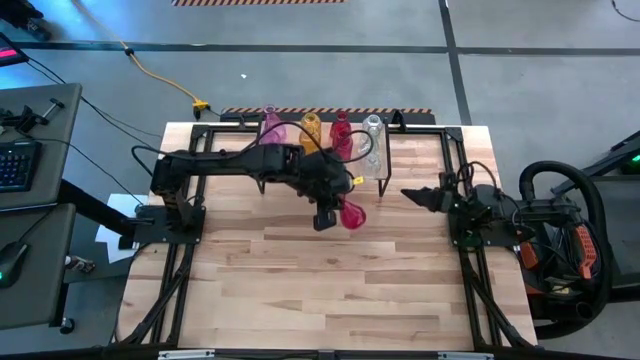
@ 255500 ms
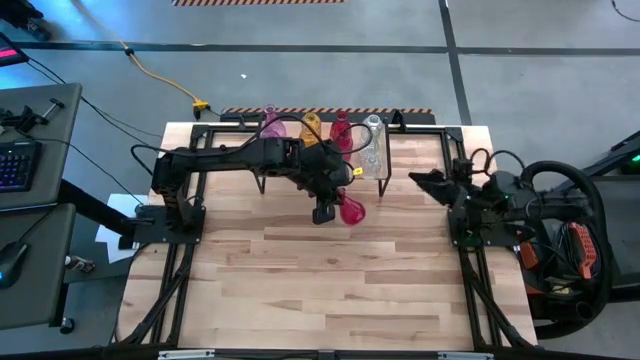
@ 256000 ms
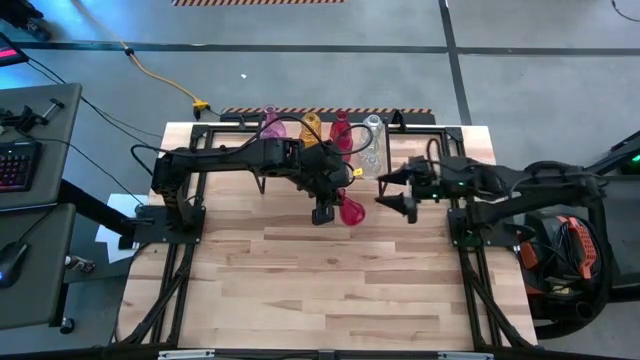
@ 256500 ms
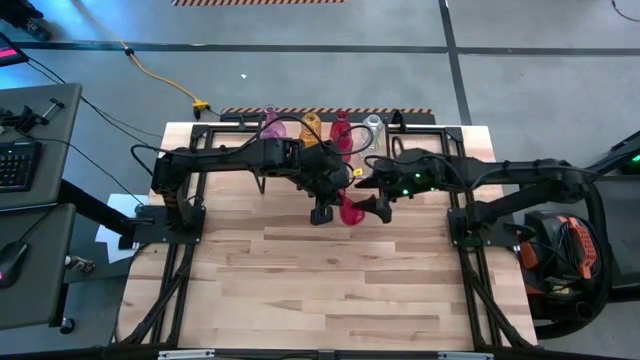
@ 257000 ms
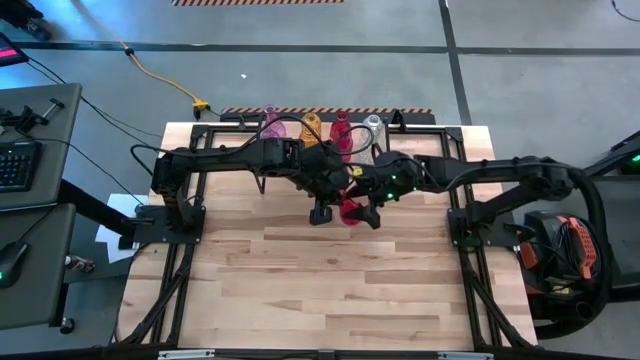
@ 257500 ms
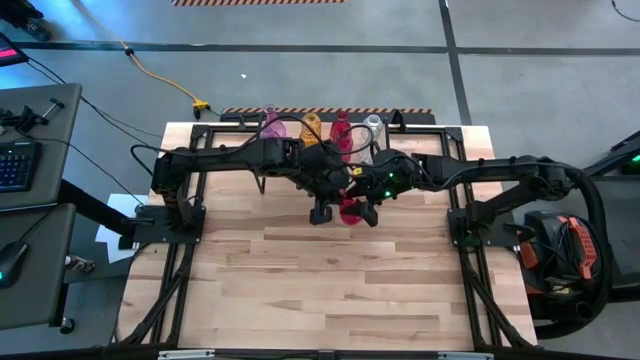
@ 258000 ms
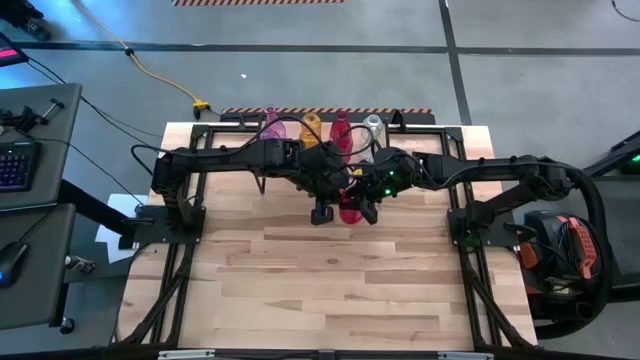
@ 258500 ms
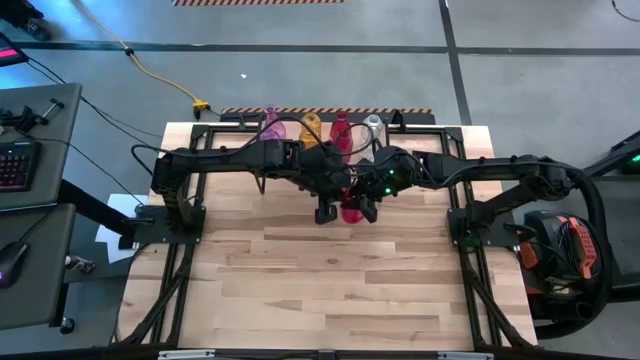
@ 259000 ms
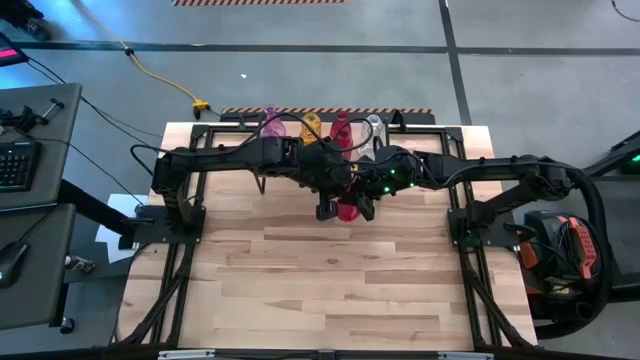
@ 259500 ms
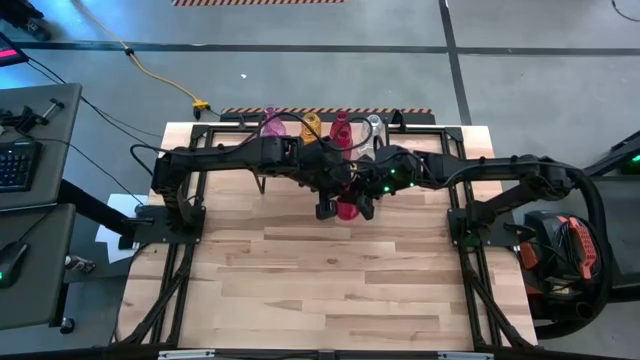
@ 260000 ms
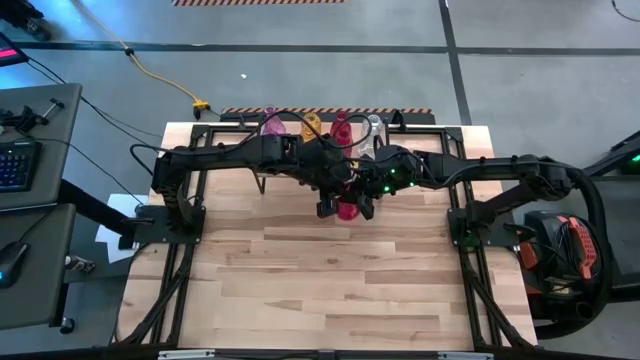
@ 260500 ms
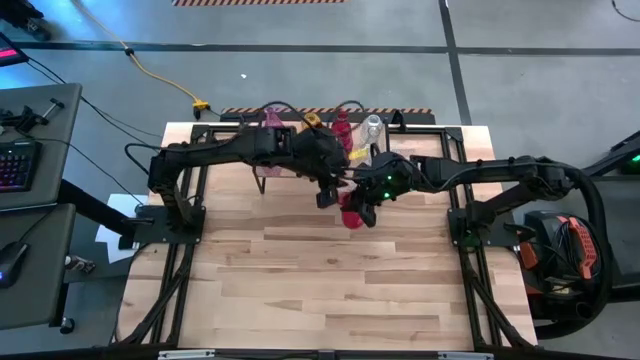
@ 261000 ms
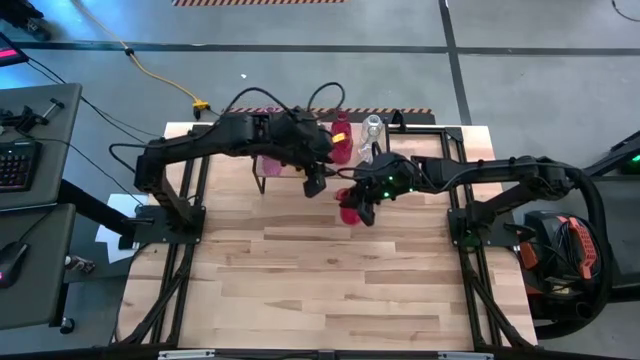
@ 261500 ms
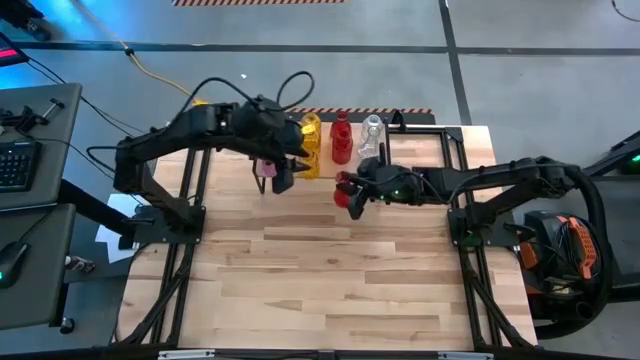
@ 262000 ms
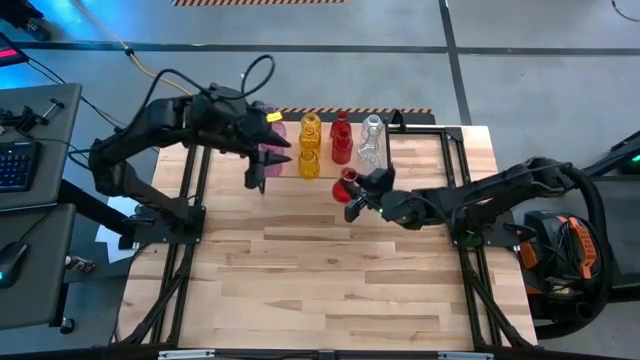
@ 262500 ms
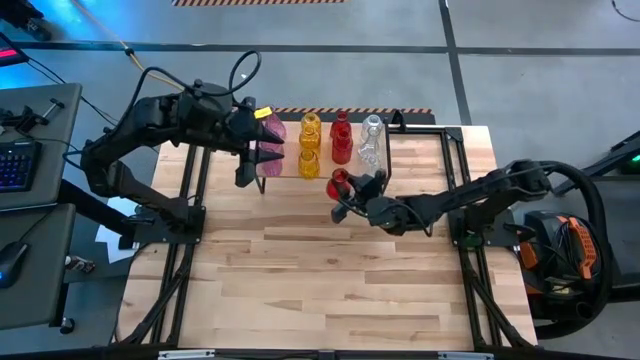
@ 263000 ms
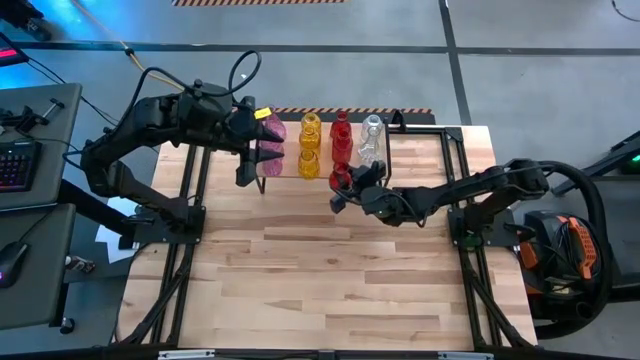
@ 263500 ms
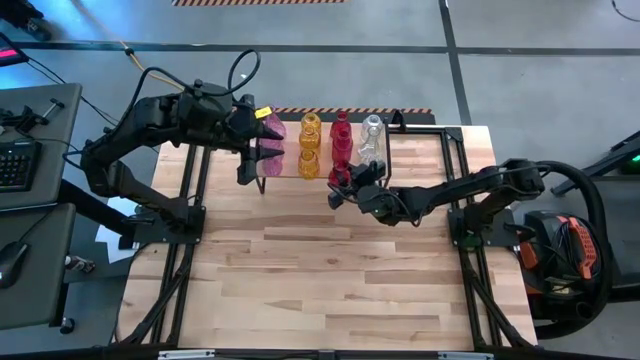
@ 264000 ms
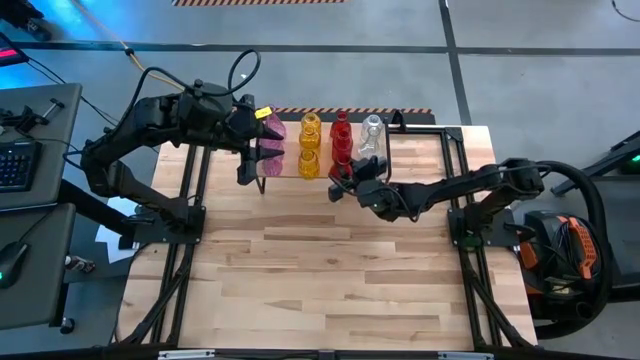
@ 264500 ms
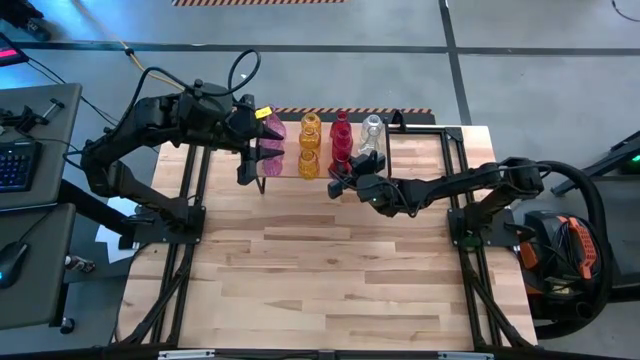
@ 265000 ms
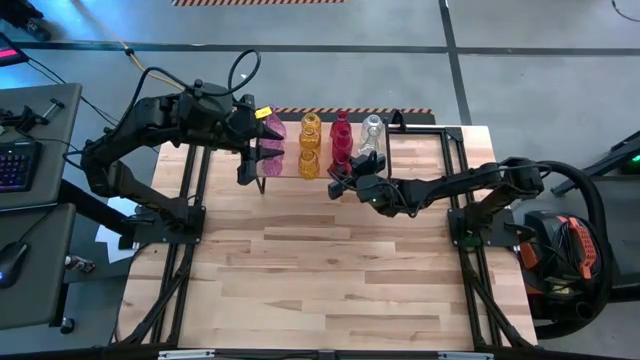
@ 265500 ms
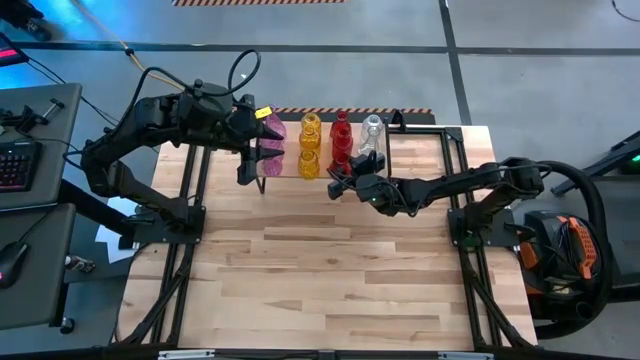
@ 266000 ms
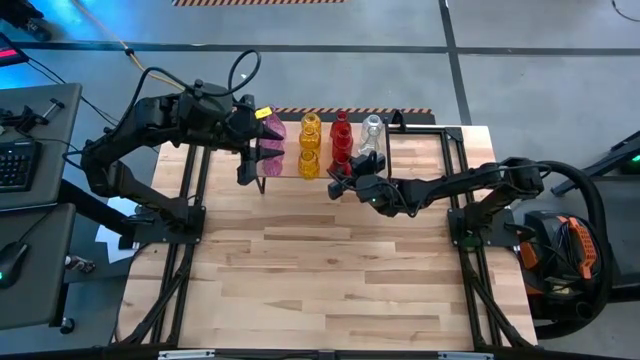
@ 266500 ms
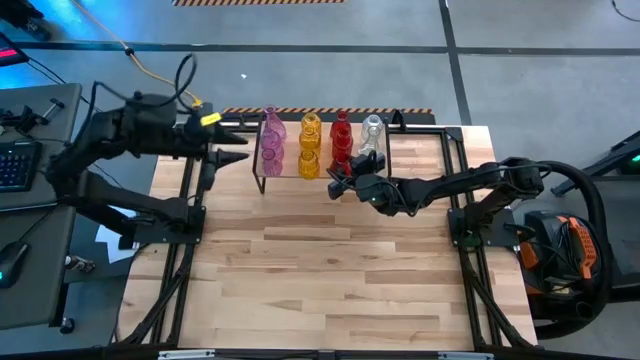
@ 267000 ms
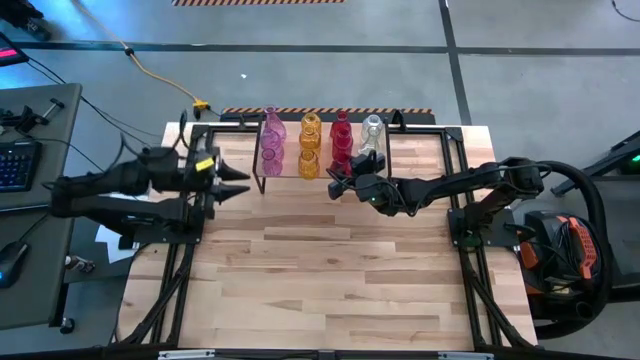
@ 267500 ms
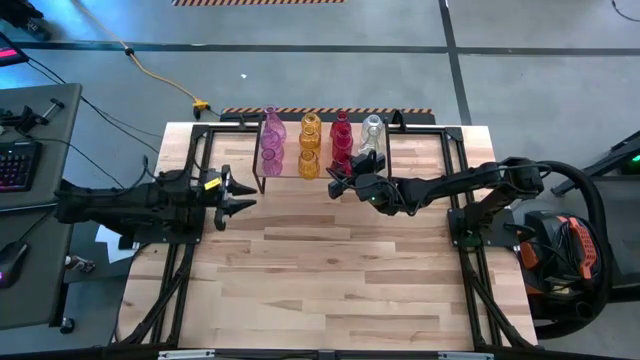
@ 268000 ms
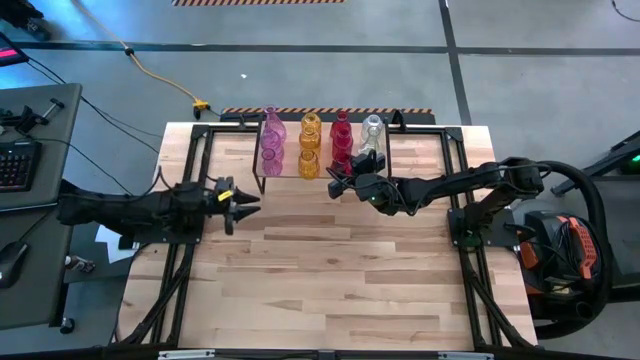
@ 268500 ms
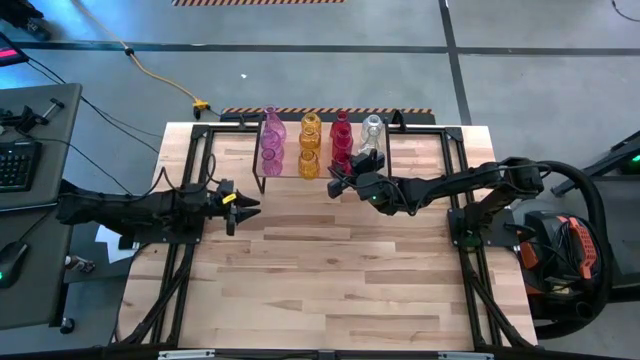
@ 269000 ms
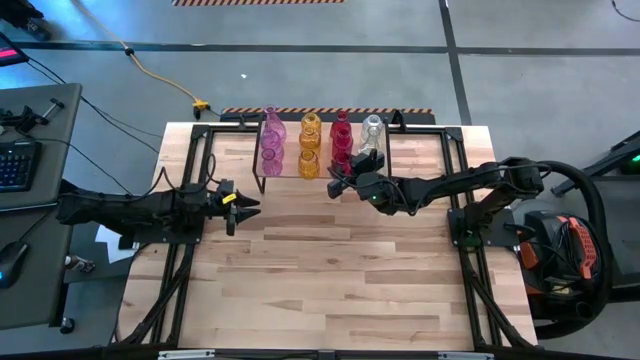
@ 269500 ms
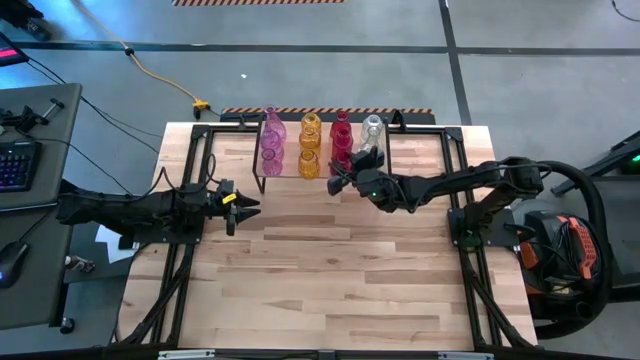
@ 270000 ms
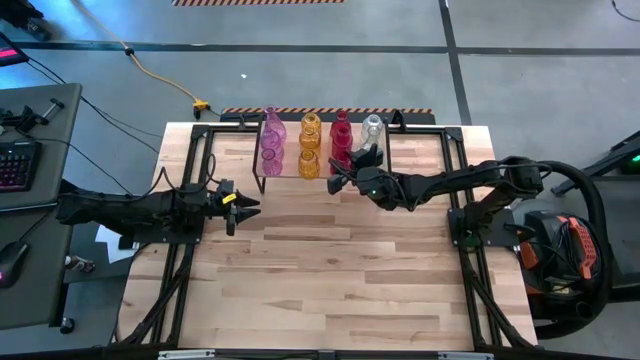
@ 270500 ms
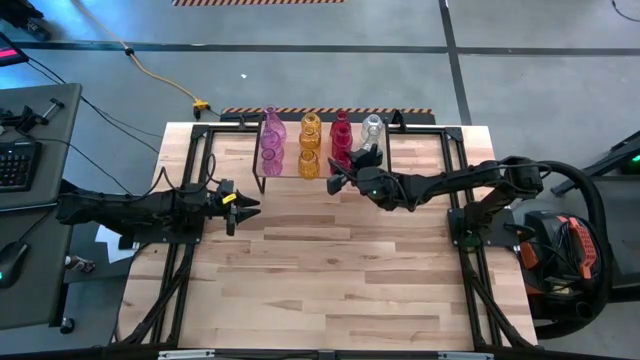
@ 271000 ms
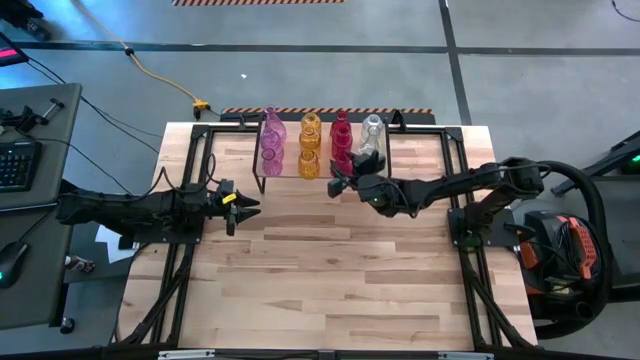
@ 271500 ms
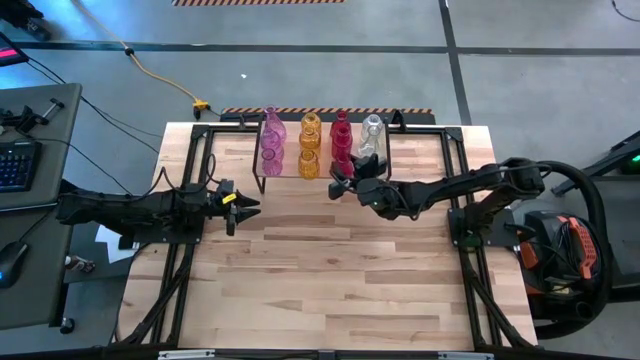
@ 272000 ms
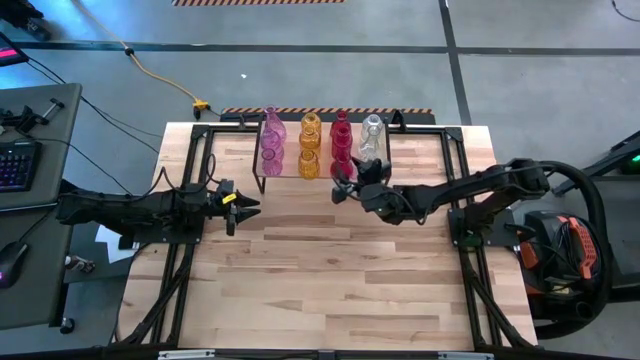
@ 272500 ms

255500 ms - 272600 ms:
Task: sort vases onto shelf
Put the red vase on the shelf aligned with the other red vases

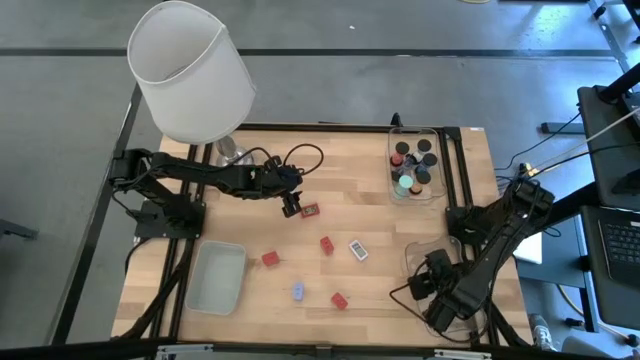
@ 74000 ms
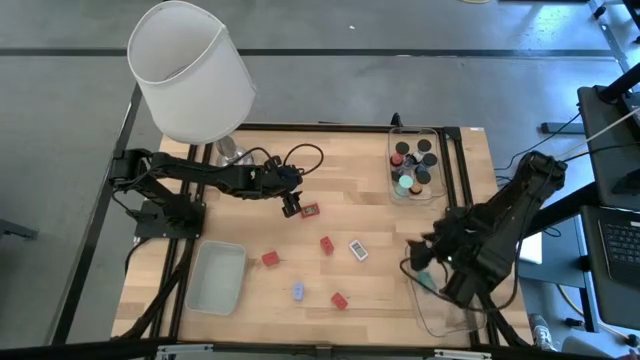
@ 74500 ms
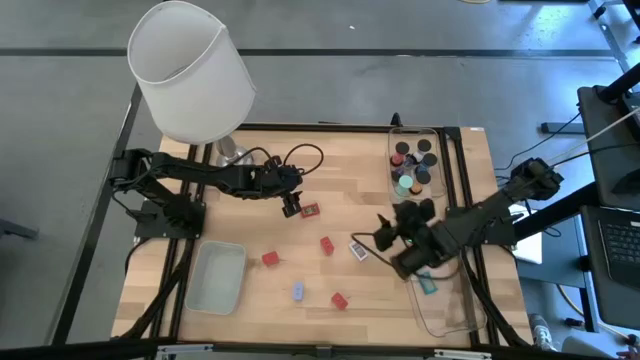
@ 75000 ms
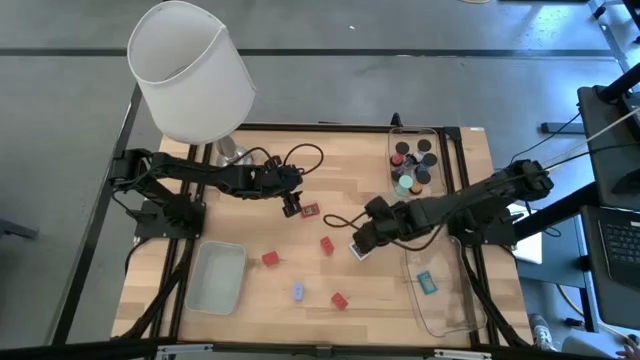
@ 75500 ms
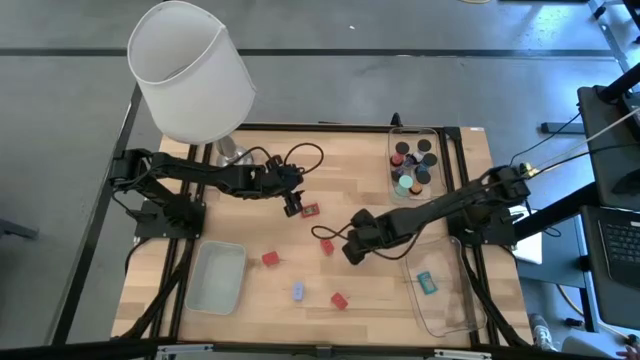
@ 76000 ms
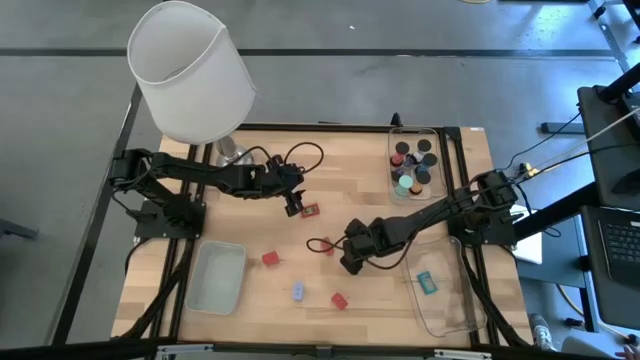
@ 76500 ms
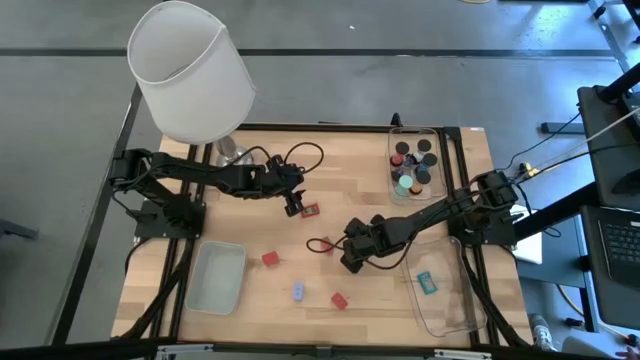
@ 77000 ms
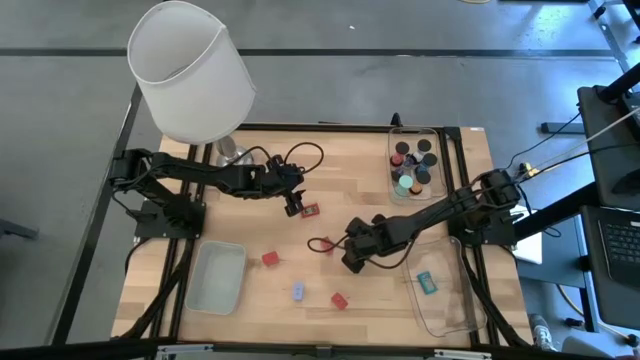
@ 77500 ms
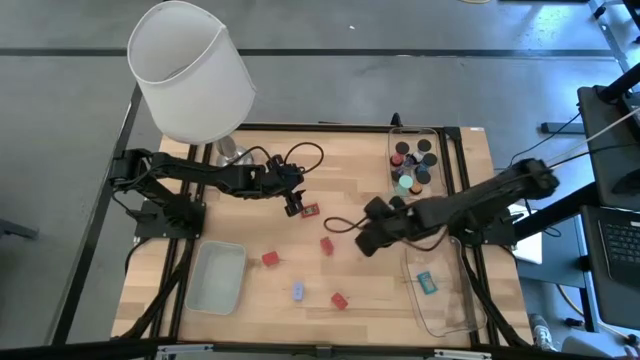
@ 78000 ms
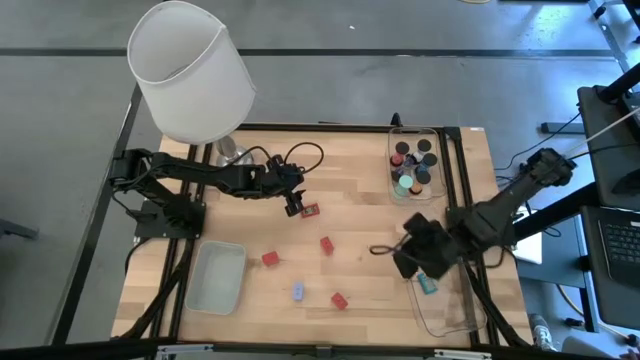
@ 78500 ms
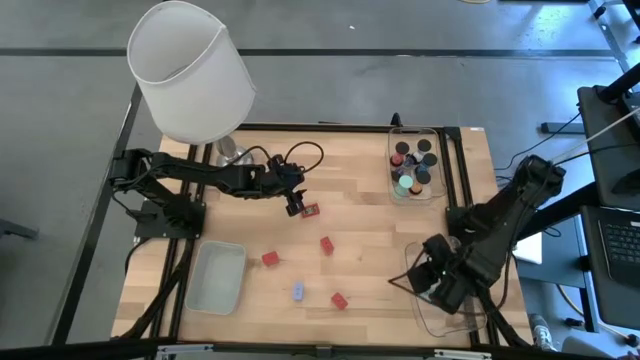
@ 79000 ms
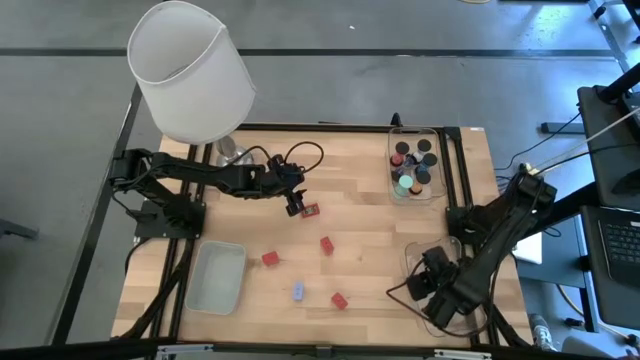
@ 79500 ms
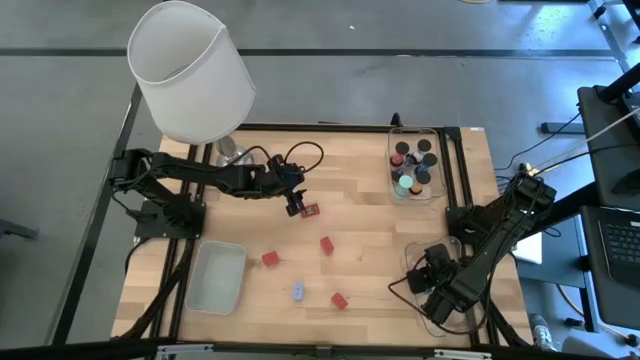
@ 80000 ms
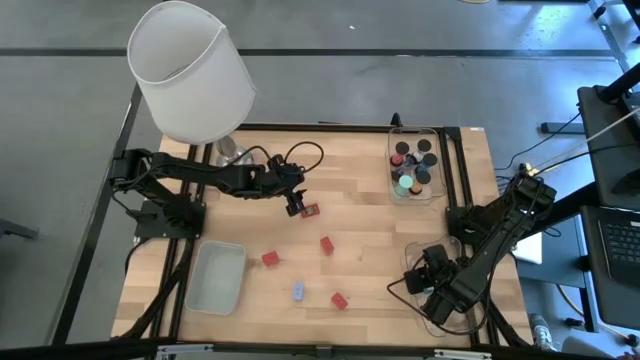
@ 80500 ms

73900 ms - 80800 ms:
Task: Pick & Place Office items
Put the light blue digital clock into the bottom transparent bin
